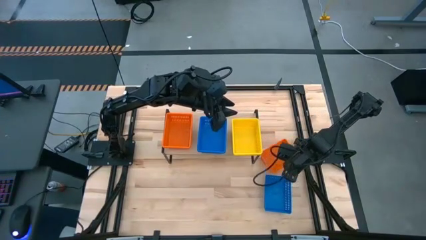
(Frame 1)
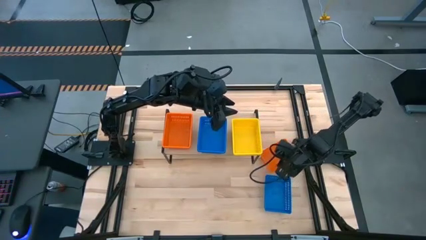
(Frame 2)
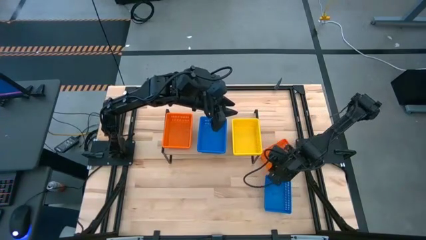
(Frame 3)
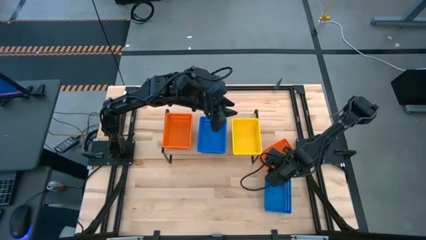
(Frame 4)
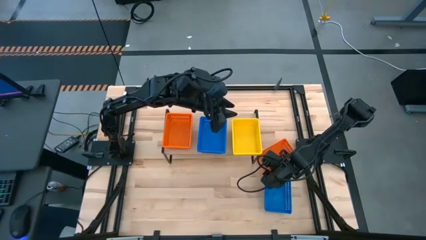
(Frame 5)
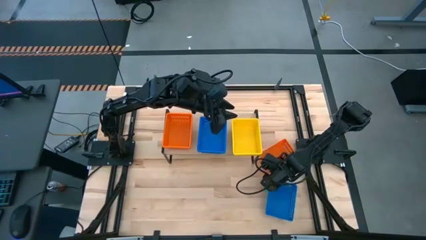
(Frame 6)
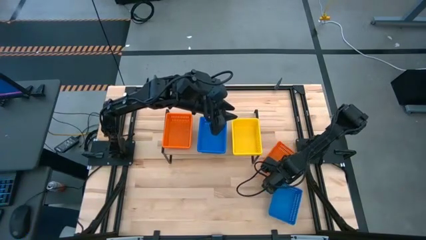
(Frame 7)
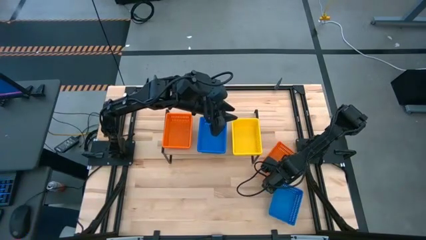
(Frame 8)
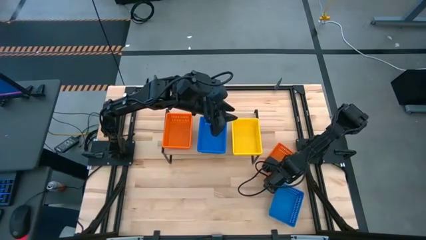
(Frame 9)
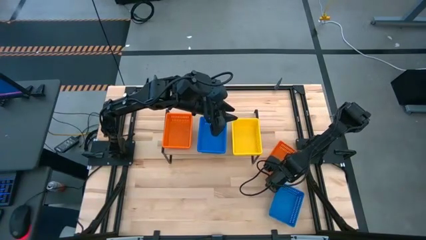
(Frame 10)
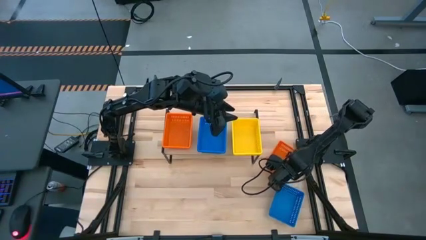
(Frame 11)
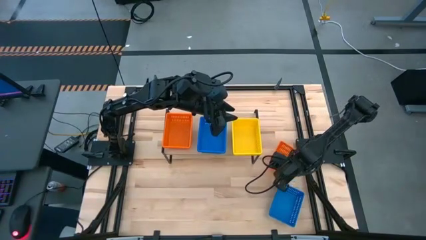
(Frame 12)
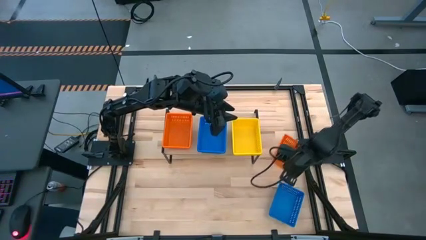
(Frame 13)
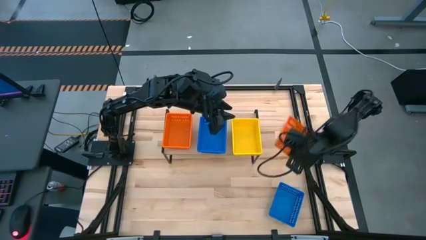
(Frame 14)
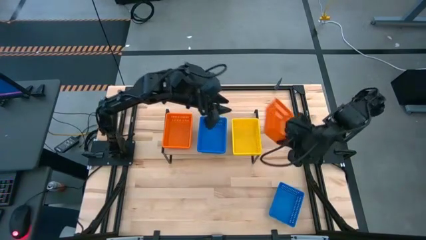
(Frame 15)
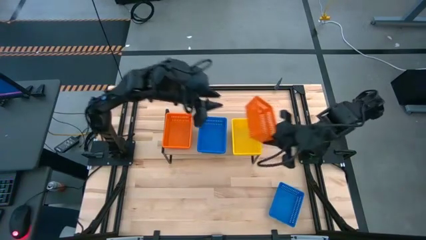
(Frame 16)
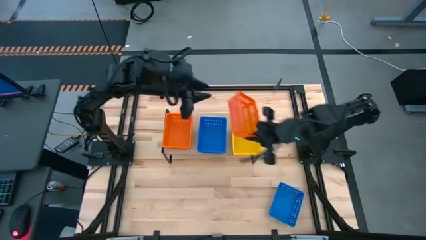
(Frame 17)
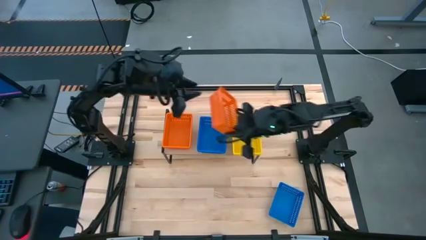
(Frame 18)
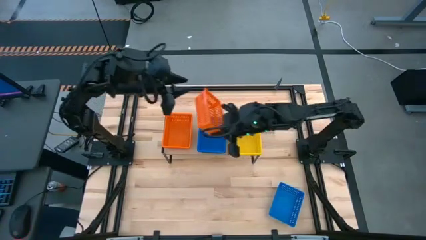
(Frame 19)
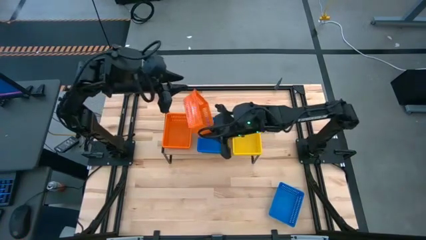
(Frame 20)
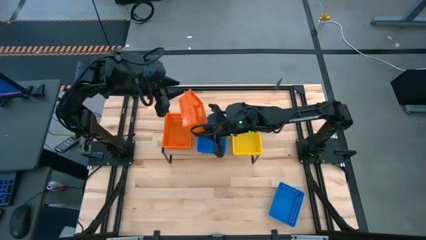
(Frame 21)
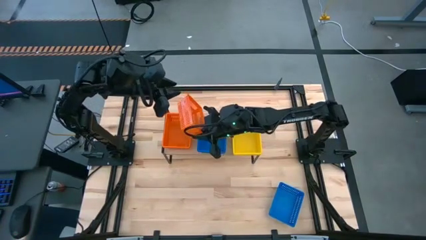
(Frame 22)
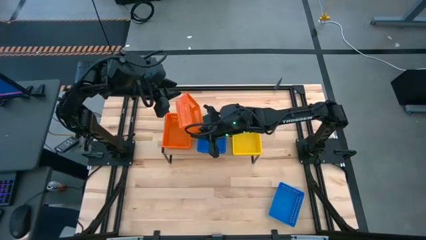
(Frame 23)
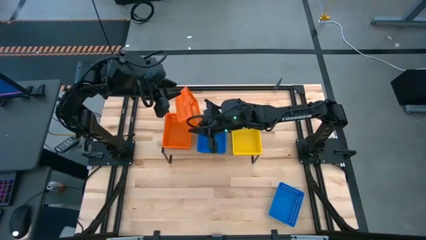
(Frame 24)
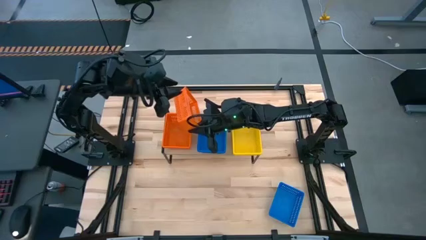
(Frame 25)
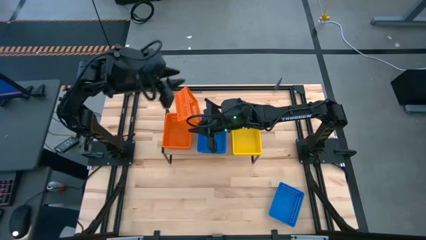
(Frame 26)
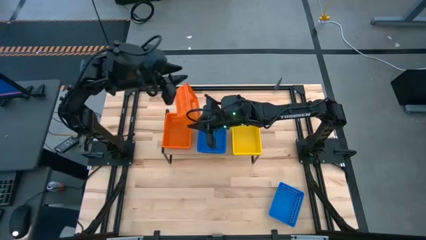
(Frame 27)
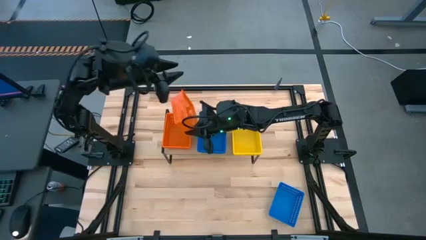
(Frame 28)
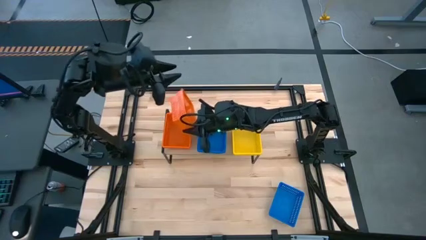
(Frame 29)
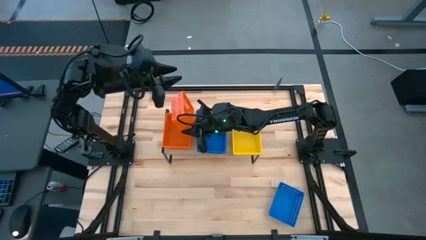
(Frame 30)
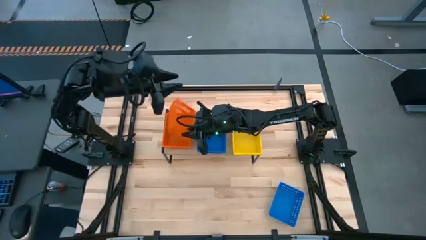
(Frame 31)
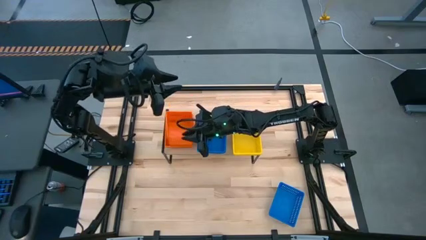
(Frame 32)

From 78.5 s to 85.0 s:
Task: Stack baskets on shelf by color
Stack the orange bin on top of the orange bin on the shelf

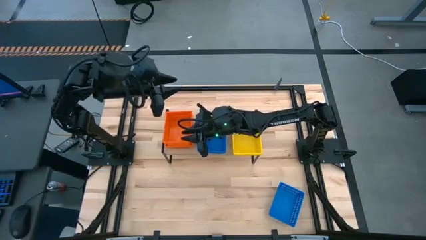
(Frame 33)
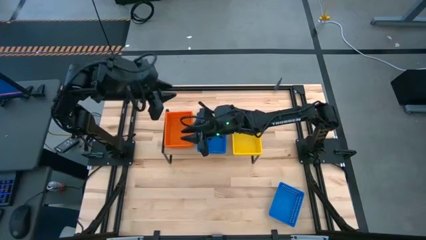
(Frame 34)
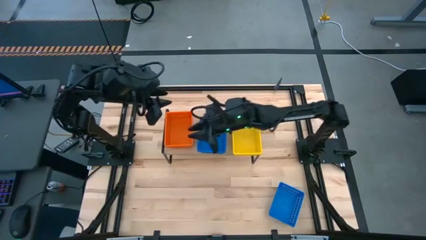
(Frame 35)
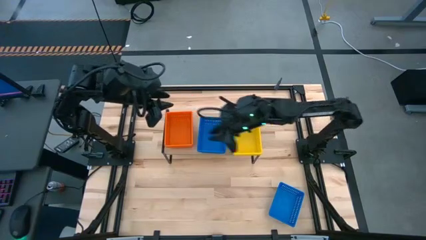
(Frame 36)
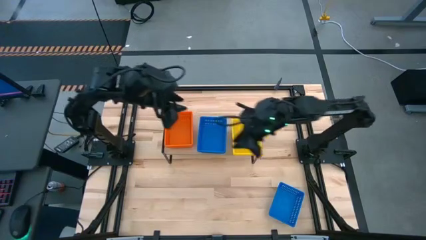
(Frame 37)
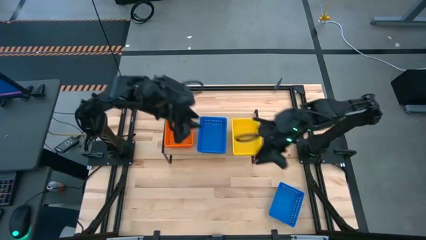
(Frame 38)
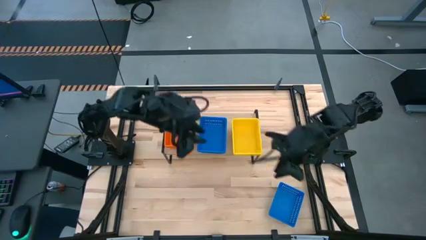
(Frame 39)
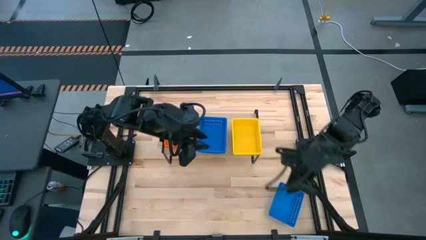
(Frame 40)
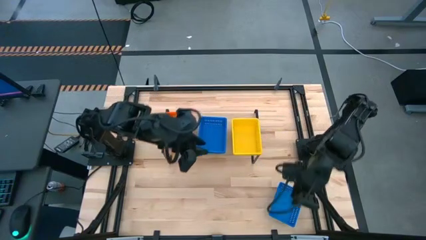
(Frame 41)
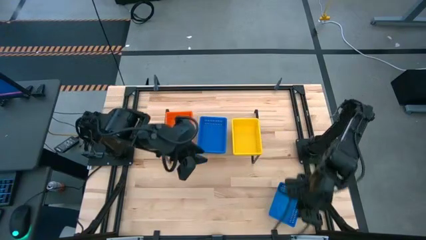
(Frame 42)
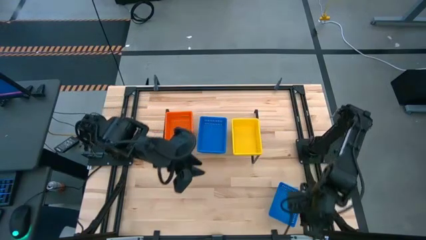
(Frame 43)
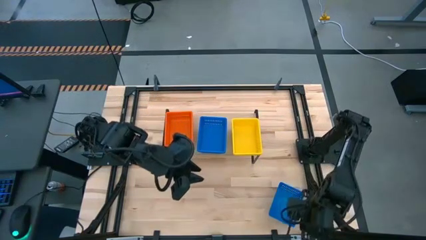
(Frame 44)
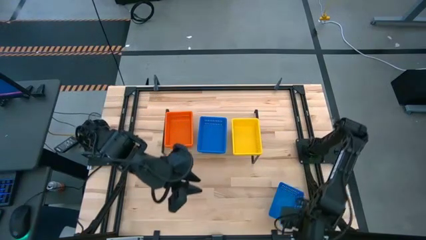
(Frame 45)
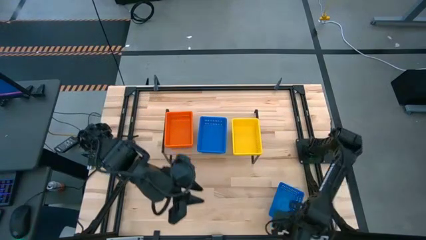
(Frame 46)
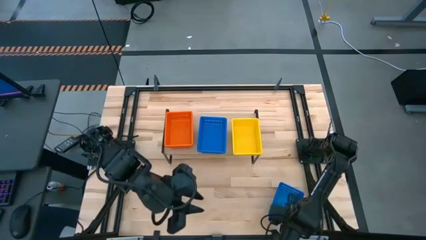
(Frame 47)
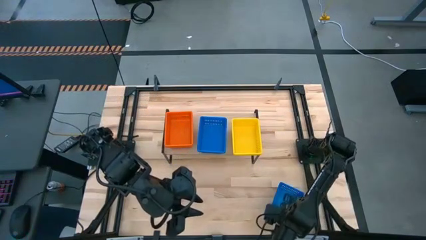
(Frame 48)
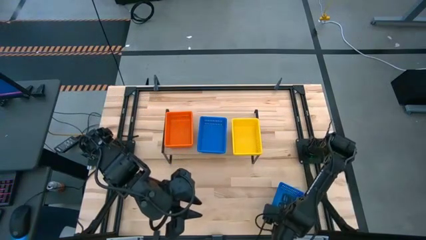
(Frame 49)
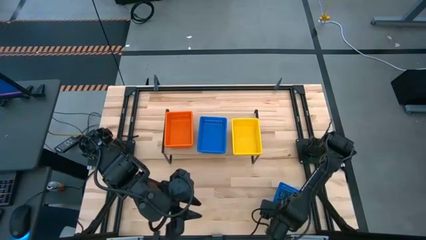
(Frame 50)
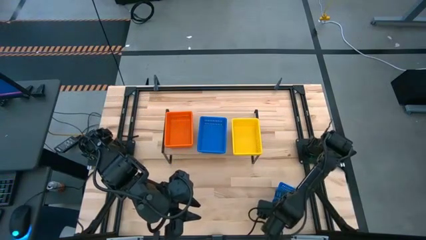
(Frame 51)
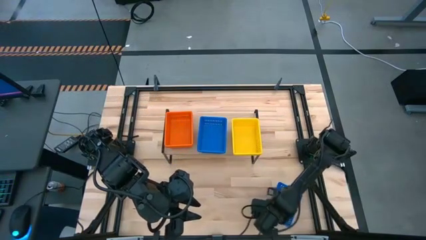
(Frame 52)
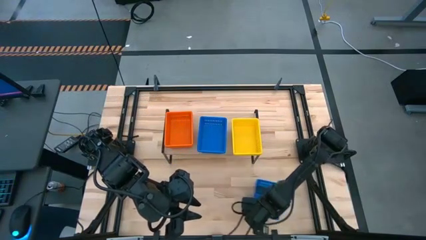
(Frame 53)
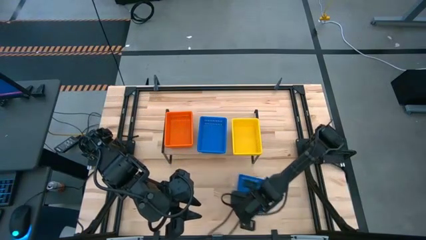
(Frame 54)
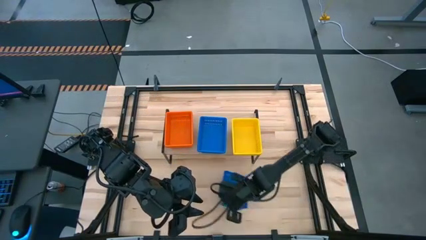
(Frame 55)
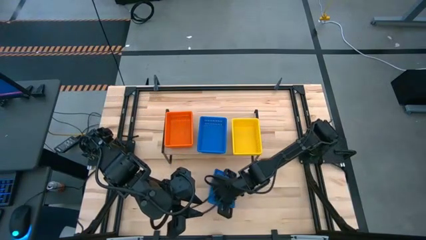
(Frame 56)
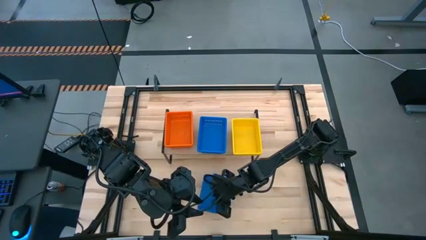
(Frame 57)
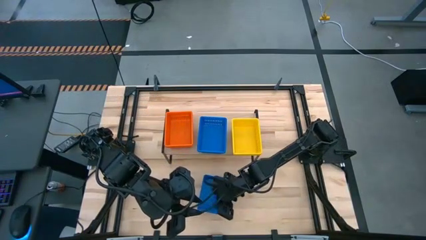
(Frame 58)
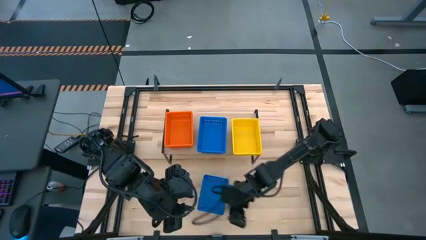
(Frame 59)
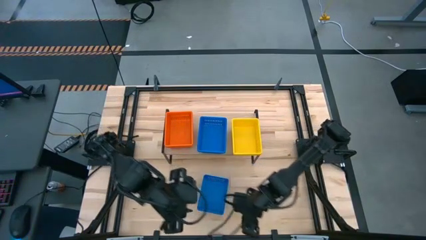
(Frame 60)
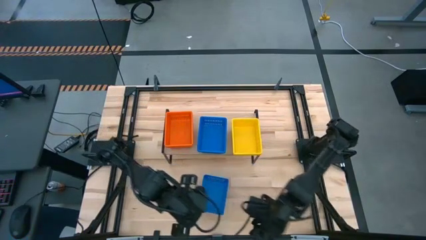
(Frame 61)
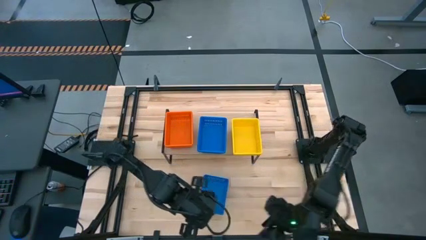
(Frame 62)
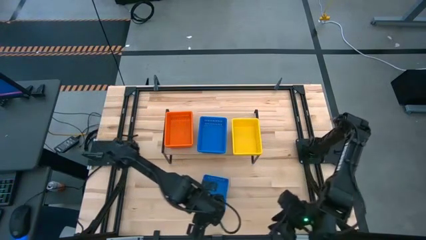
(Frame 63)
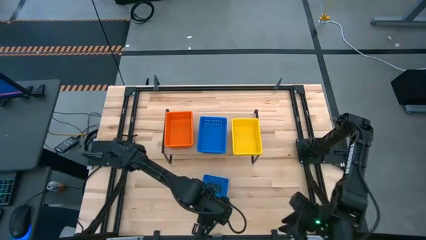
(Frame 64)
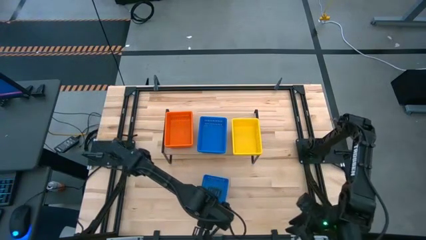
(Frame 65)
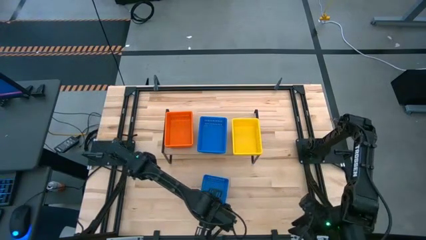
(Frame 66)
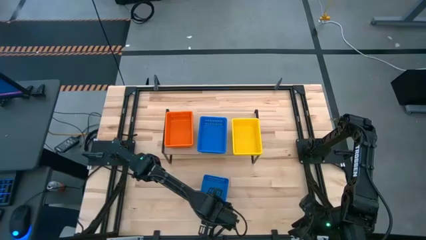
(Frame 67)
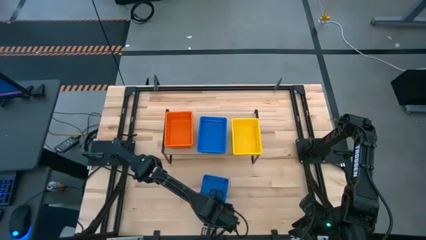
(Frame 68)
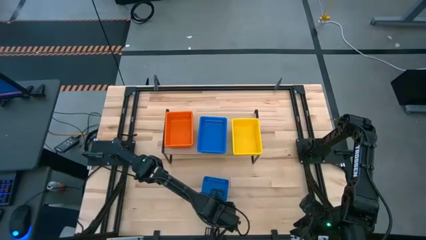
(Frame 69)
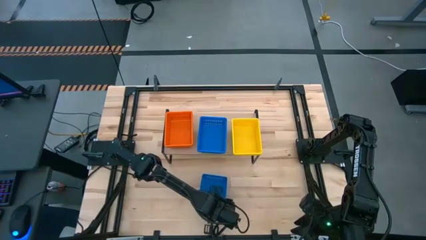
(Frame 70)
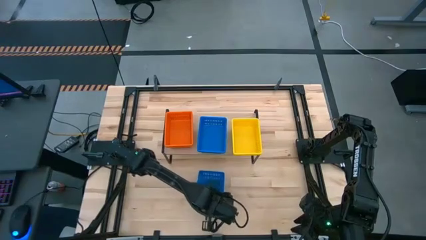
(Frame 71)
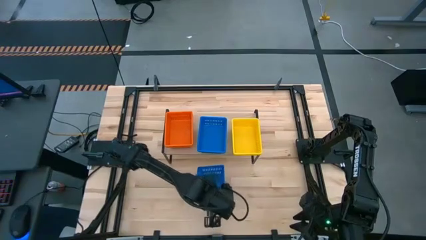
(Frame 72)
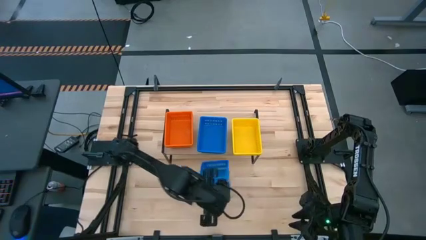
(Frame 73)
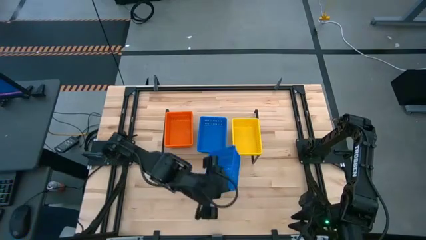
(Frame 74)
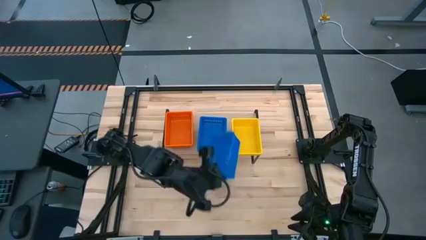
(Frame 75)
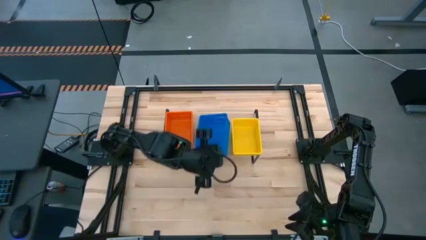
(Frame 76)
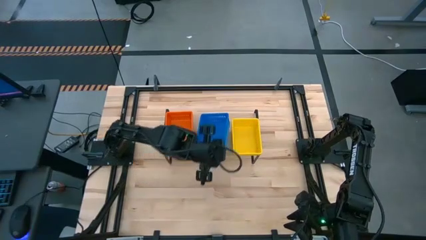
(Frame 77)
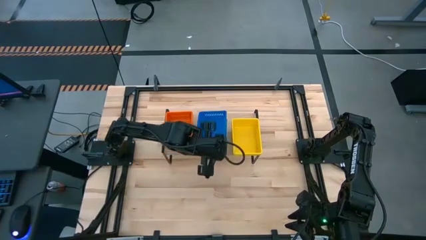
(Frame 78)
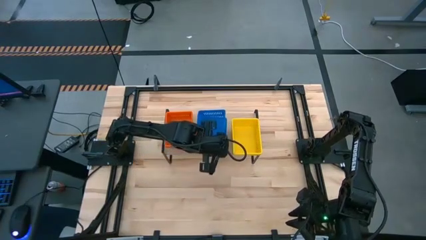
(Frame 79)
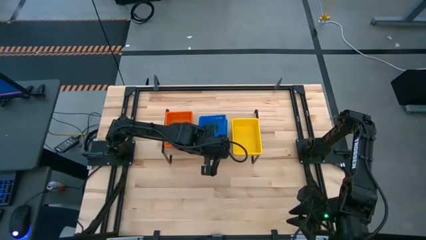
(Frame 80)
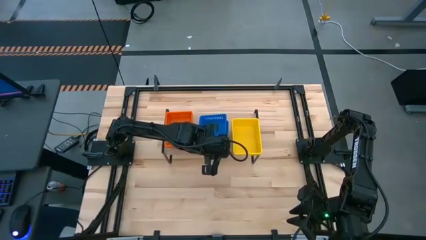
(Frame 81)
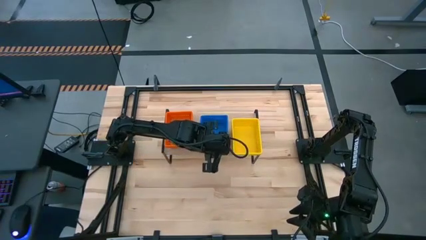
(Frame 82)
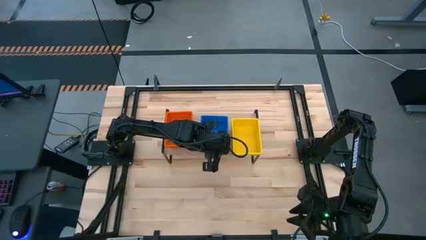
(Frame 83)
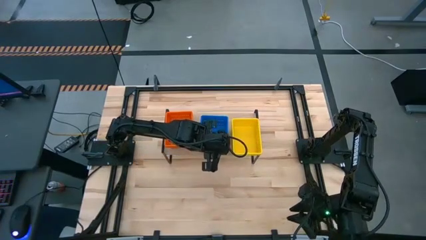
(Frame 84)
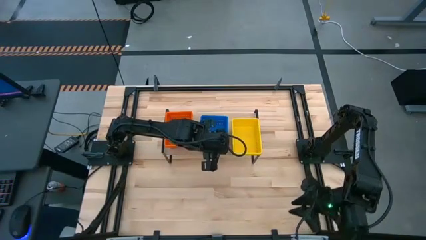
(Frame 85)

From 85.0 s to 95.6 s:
Stack the blue bin on top of the blue bin on the shelf
